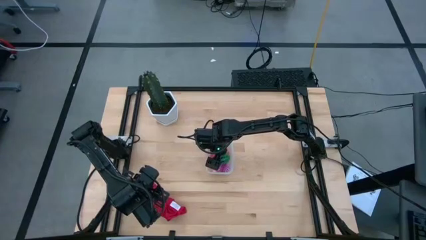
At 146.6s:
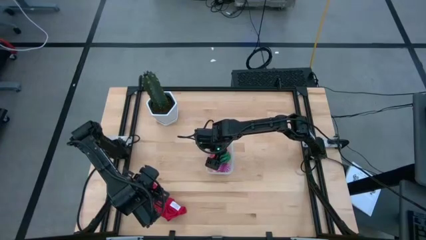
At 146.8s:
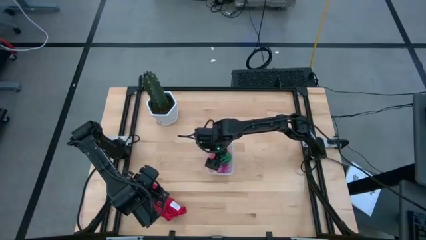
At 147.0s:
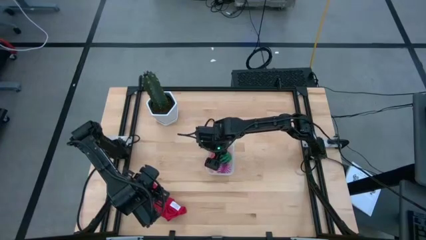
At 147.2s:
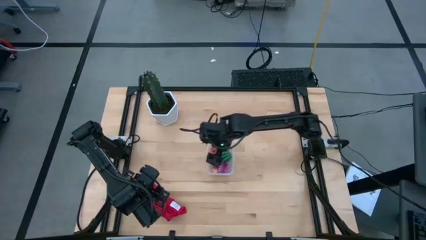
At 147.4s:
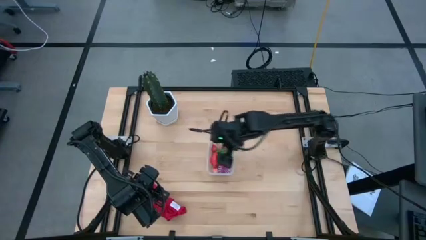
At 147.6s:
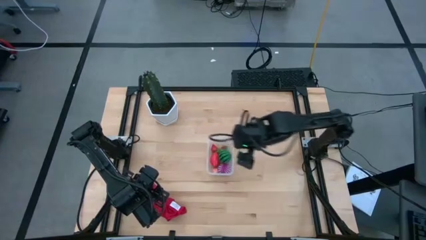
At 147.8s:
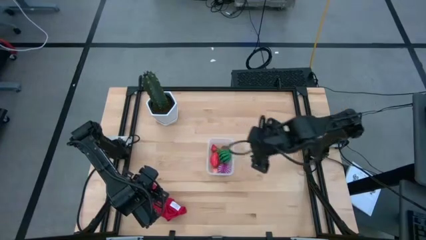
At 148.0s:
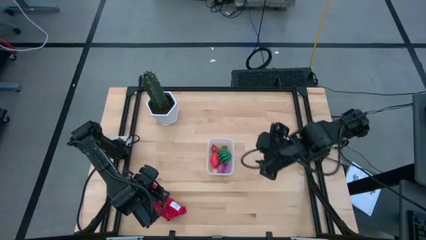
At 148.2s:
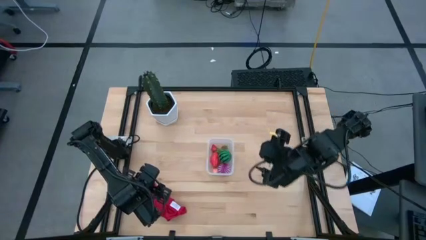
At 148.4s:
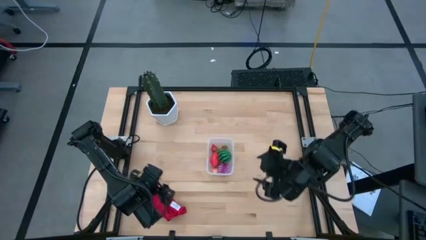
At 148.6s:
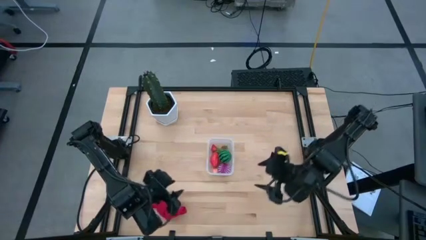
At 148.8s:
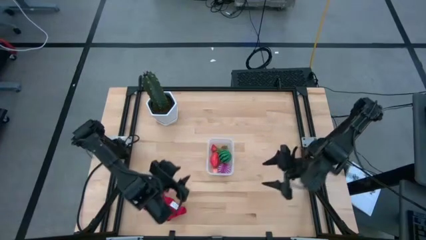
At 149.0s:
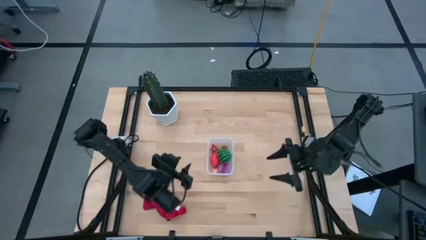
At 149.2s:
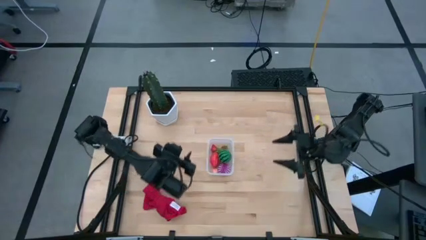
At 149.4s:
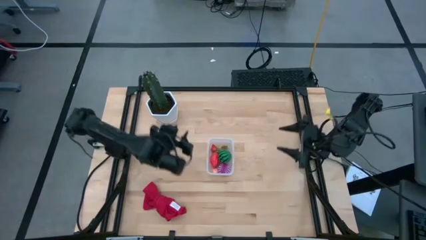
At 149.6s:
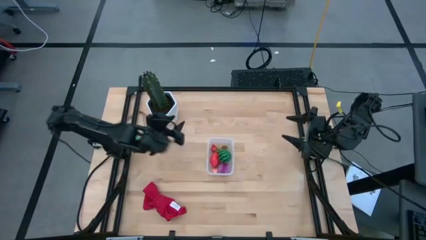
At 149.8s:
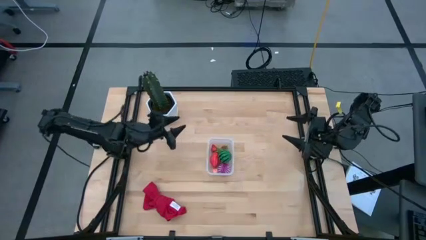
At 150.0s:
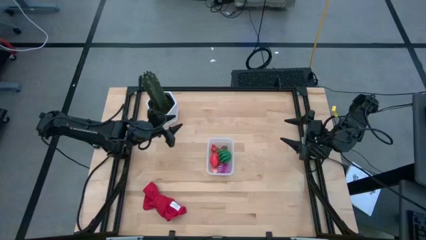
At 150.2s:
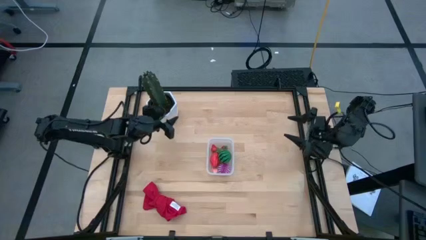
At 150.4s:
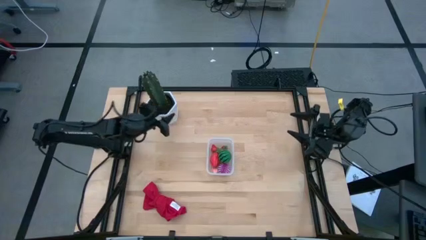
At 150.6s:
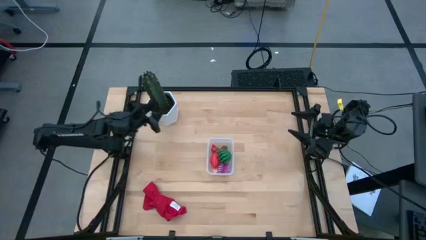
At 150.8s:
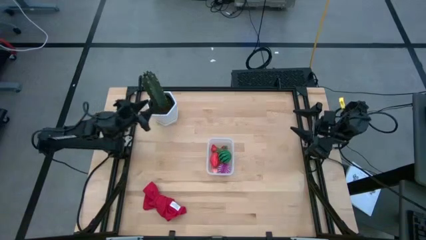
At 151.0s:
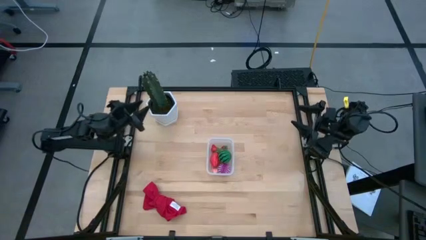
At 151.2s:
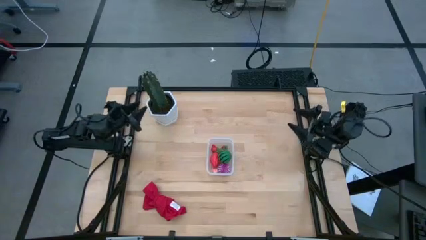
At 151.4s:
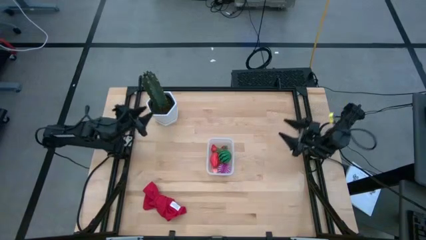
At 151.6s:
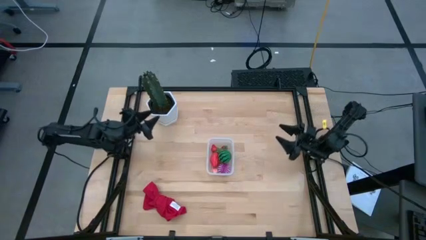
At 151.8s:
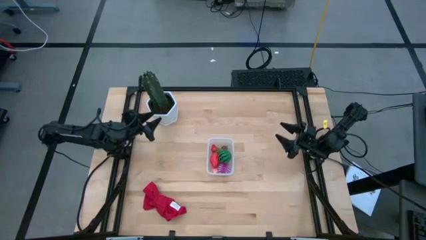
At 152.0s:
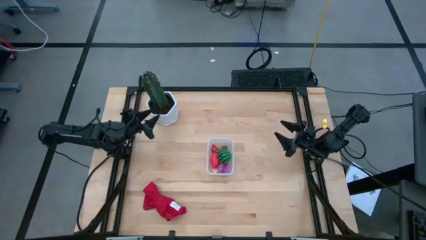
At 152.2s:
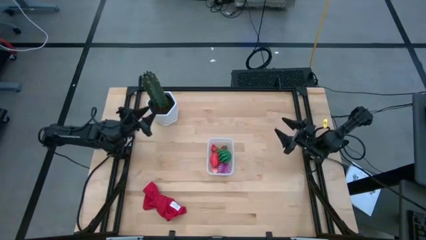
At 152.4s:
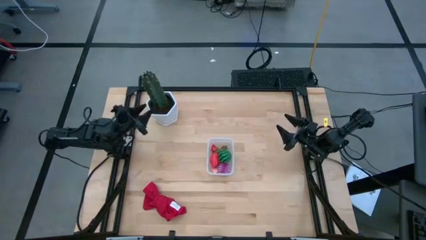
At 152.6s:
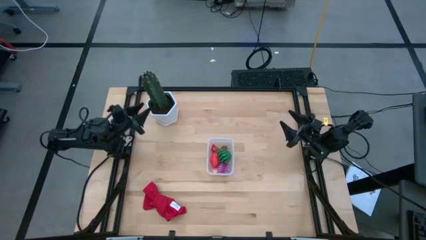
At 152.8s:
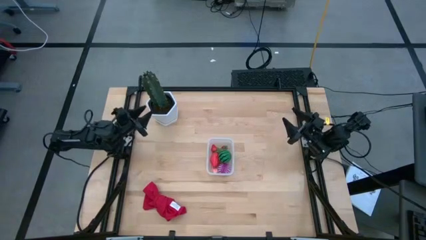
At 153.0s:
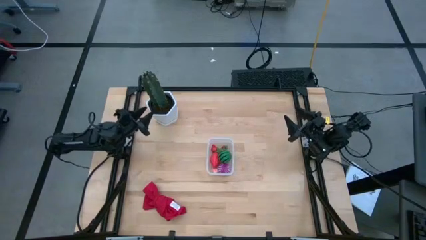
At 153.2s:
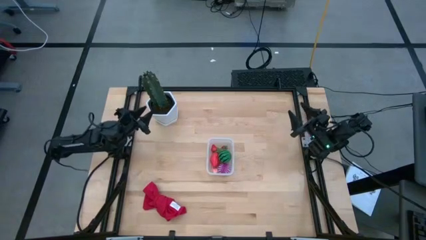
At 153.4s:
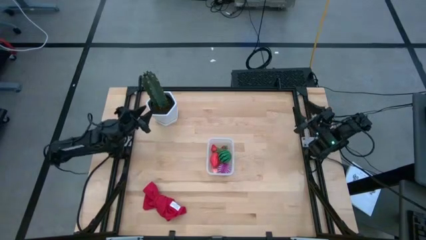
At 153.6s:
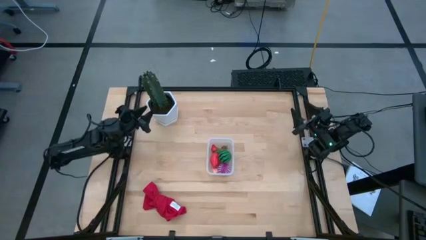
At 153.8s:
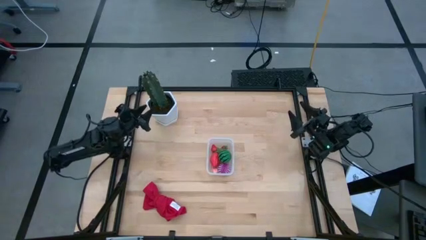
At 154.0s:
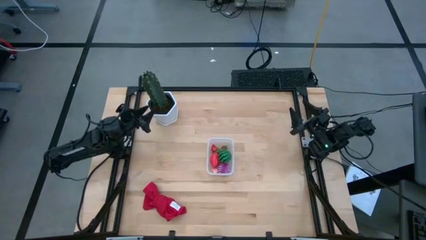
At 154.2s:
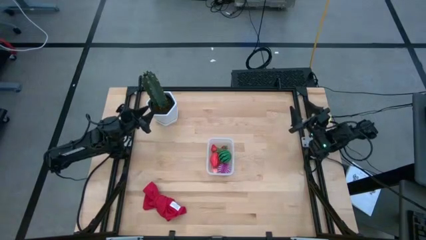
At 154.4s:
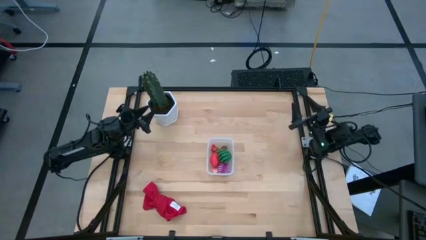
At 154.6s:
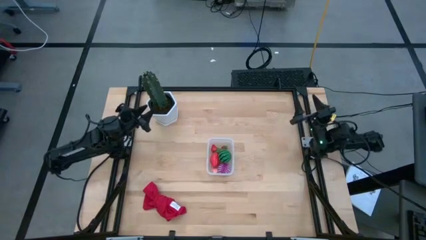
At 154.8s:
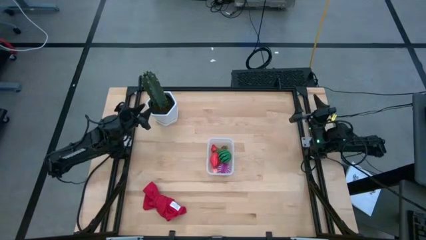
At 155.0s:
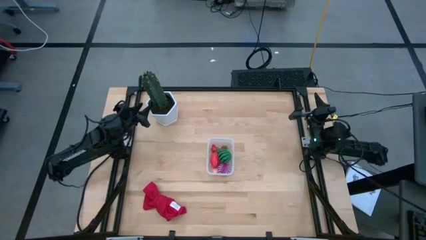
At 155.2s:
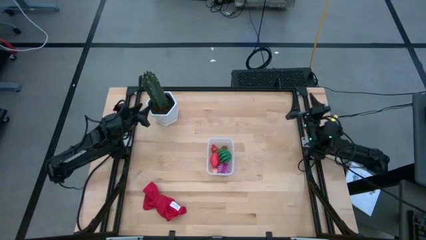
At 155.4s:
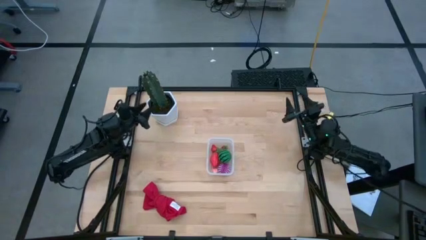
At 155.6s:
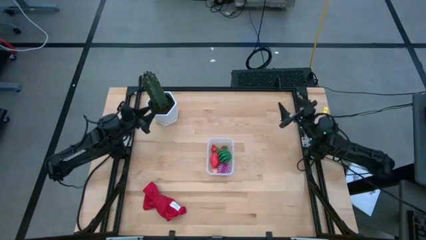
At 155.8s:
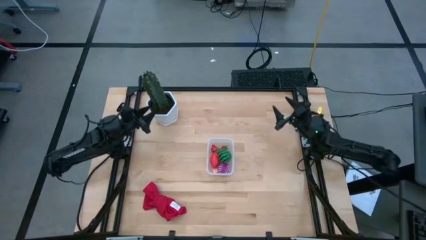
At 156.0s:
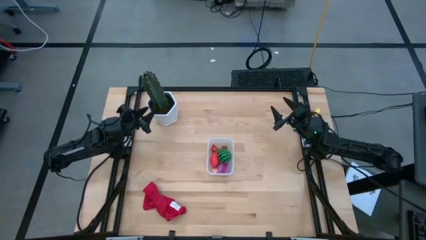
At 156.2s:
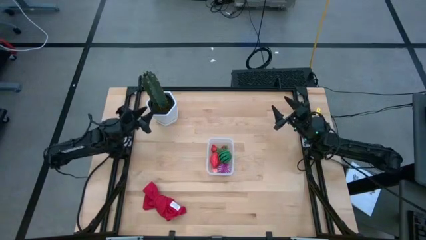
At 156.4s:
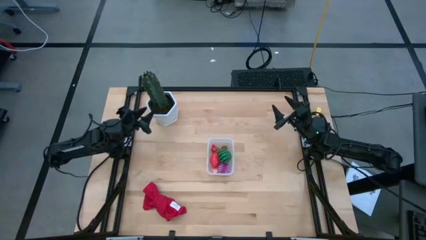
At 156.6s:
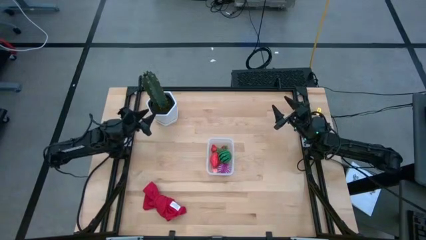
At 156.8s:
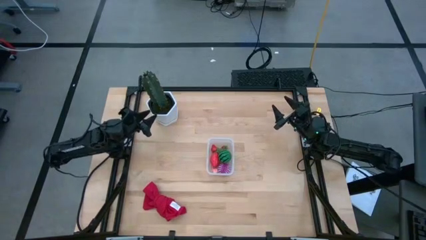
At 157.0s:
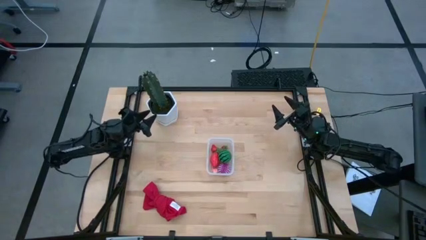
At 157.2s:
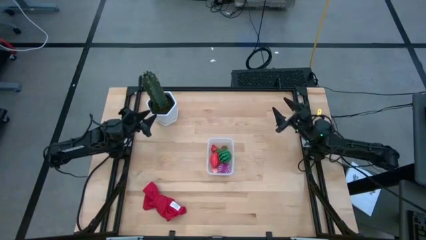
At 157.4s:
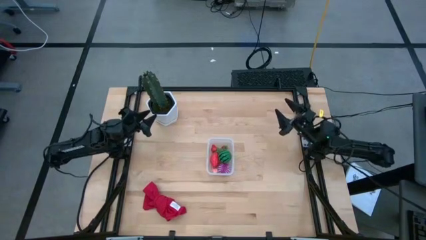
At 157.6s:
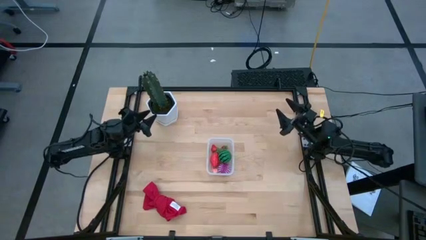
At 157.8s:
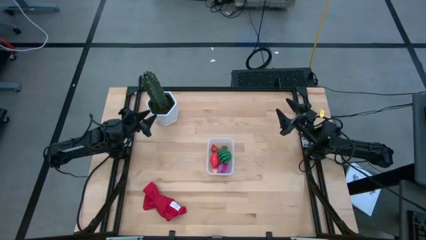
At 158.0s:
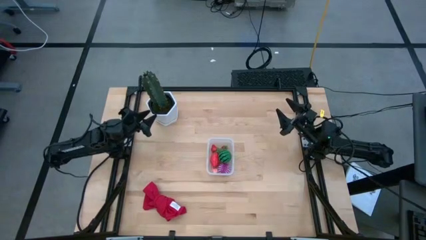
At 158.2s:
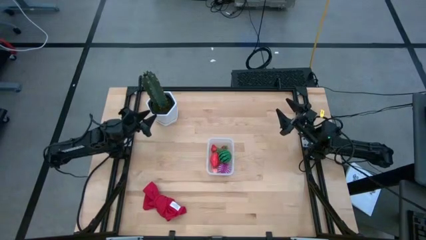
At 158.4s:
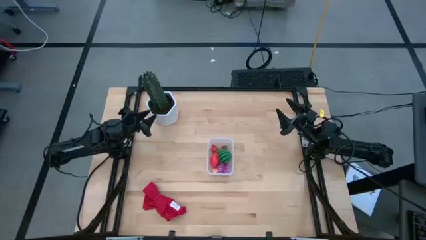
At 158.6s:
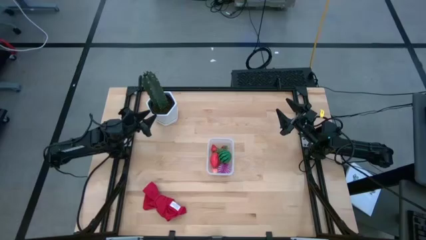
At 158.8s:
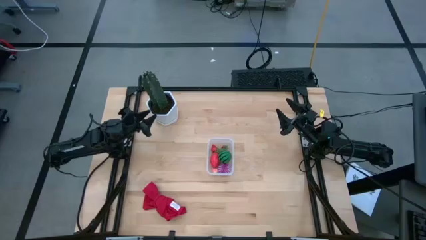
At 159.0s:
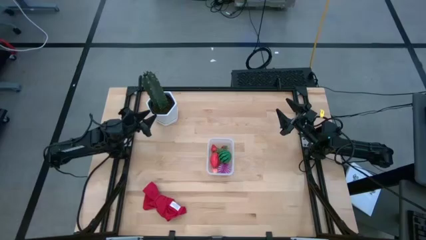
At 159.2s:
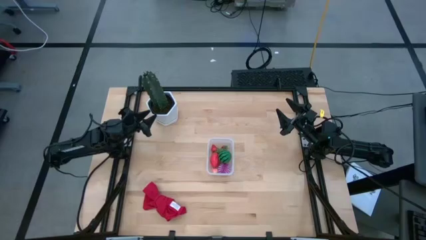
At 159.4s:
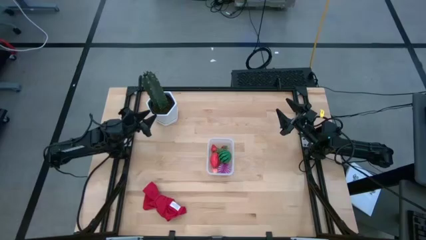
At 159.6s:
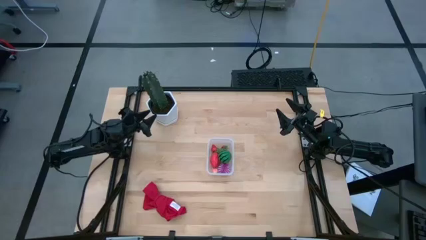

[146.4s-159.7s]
Task: Pick and placing Produce into tupperware
Return to Home Position

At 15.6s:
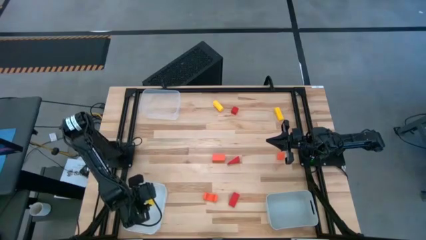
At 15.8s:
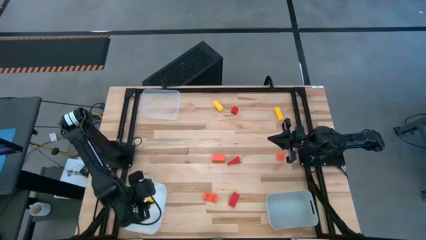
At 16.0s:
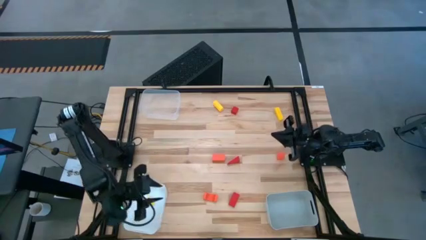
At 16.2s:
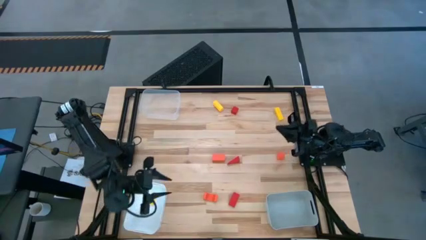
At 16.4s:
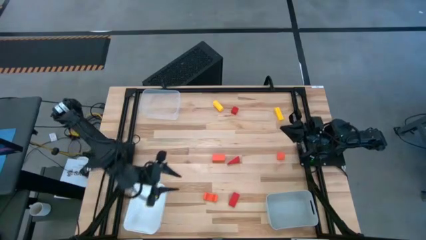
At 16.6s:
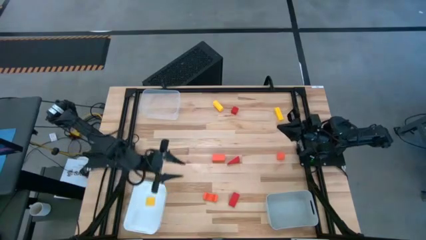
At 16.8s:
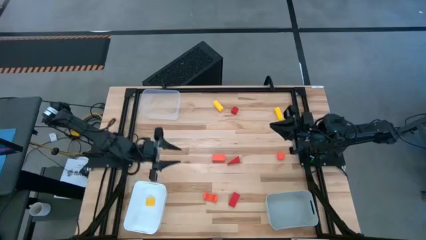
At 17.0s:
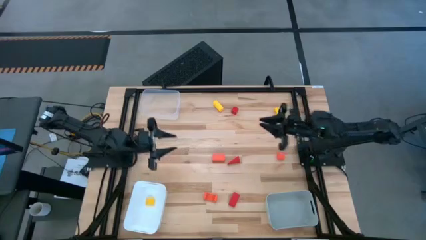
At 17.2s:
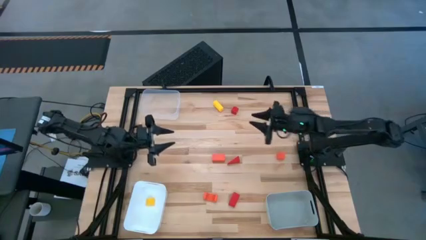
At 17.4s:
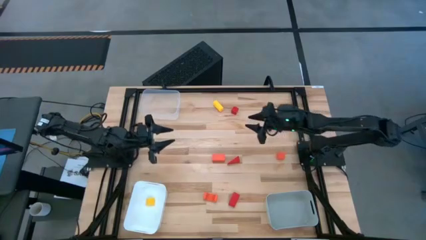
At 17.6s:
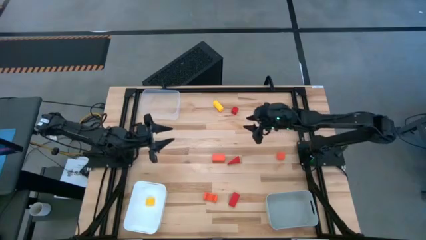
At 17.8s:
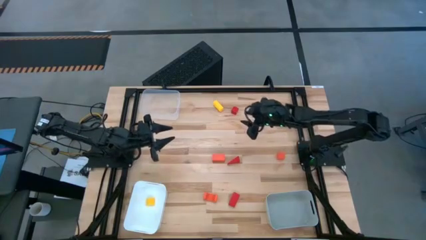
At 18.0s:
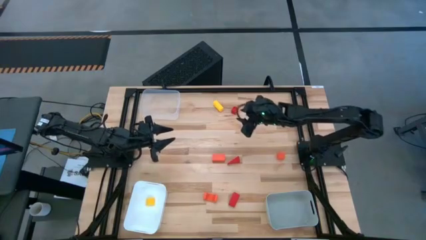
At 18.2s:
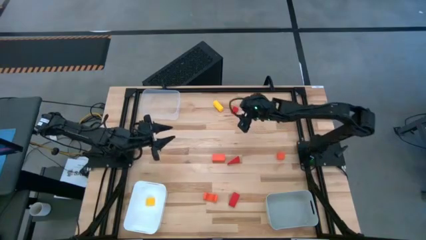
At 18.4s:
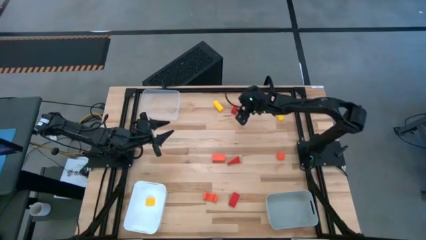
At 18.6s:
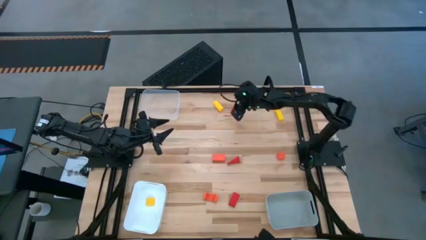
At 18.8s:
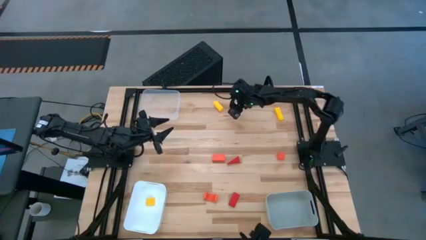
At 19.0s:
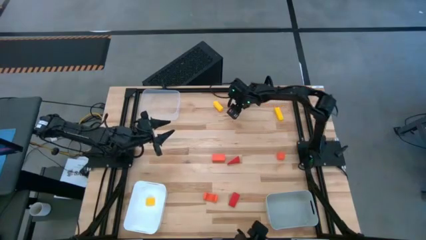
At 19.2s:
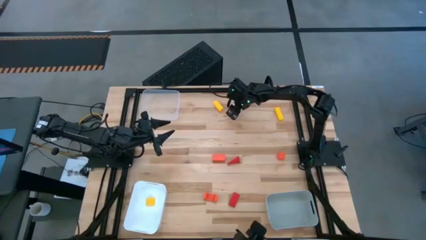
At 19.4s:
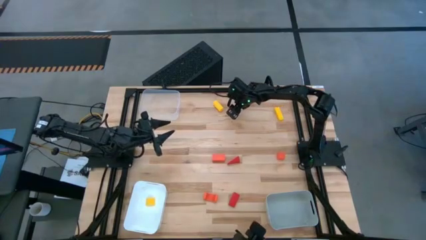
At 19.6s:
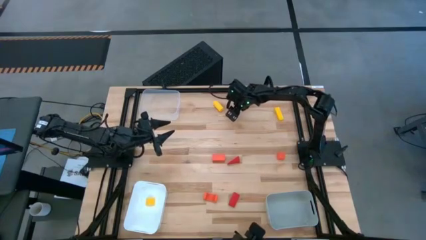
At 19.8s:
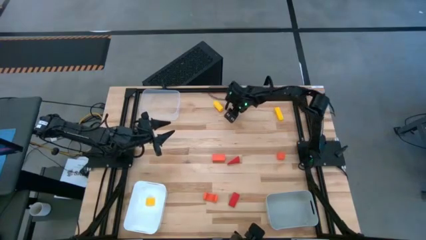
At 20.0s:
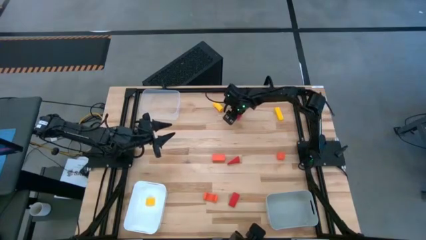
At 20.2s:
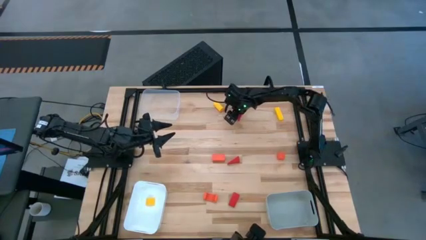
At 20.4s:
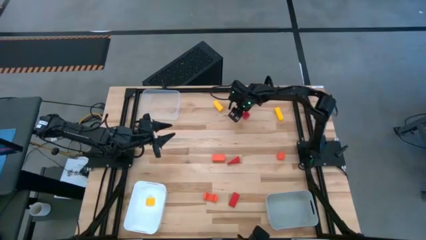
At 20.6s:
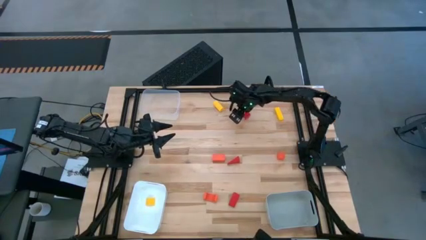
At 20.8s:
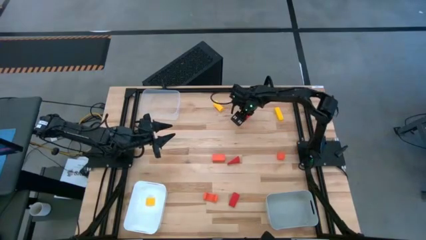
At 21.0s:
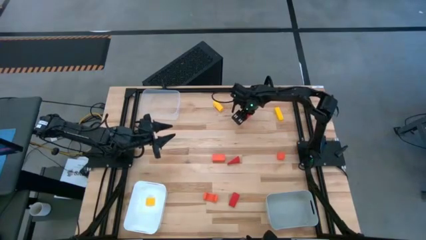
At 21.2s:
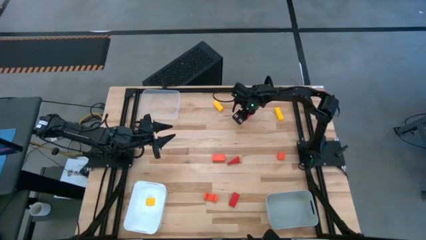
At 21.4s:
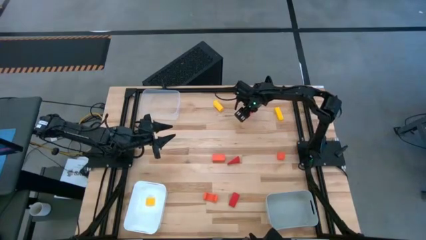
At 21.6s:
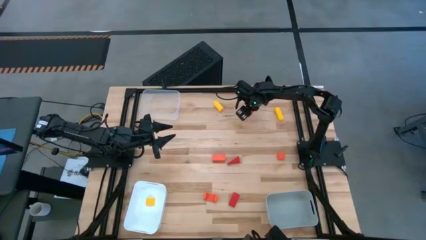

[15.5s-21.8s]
Task: Sort & place blocks by color
Put the top red block into the gray bin
